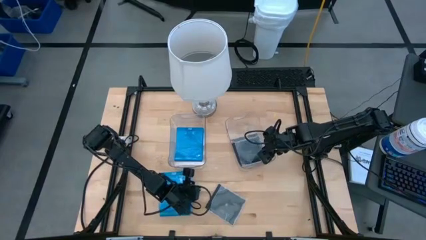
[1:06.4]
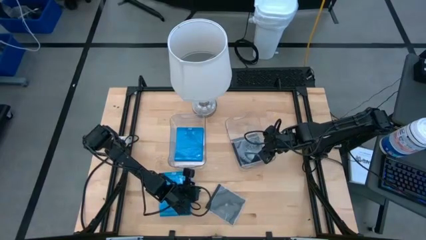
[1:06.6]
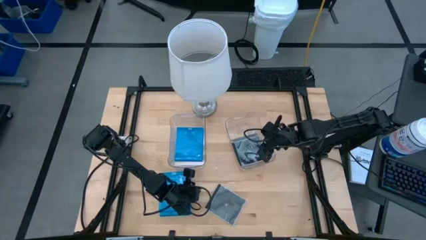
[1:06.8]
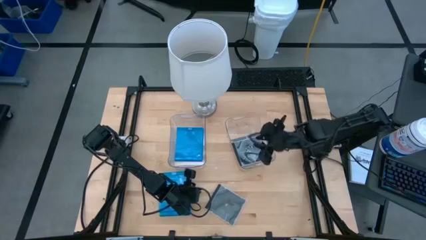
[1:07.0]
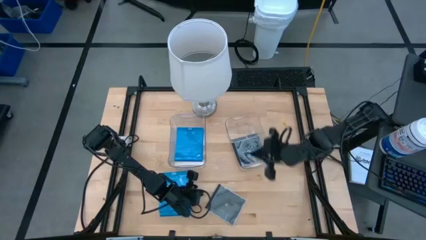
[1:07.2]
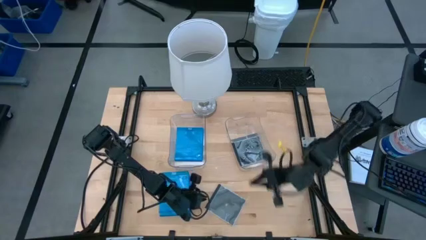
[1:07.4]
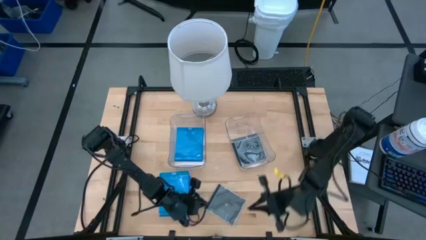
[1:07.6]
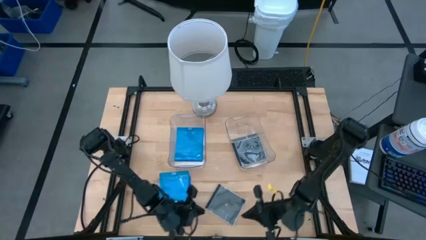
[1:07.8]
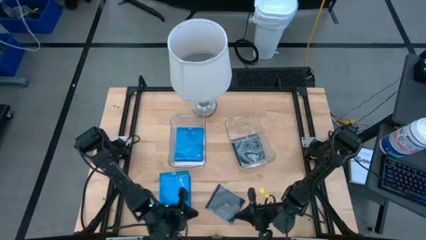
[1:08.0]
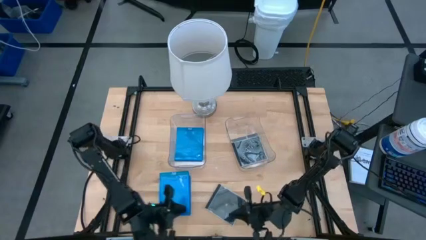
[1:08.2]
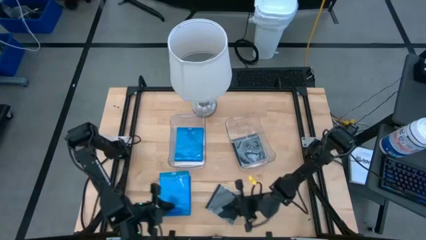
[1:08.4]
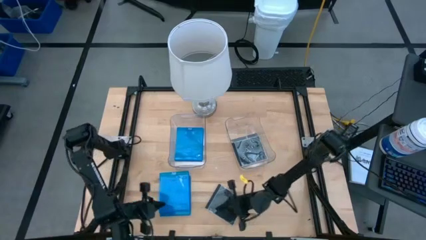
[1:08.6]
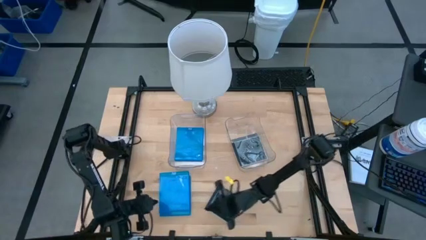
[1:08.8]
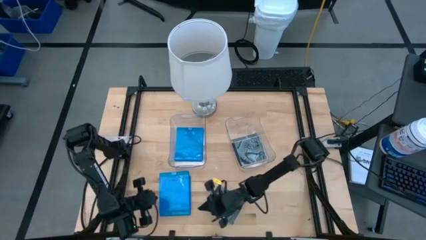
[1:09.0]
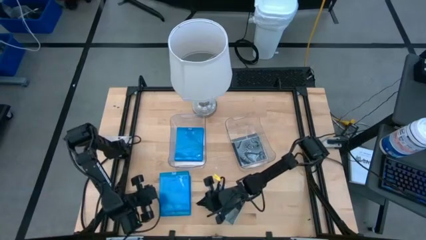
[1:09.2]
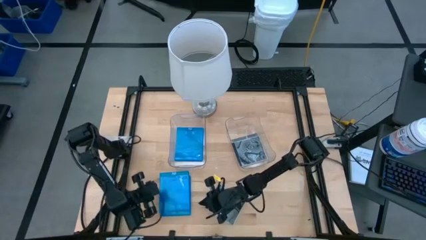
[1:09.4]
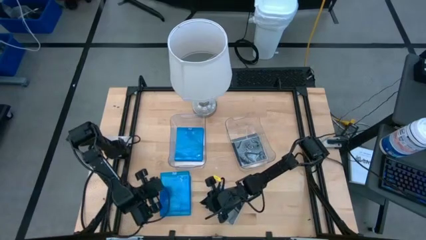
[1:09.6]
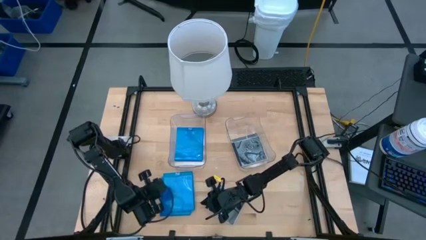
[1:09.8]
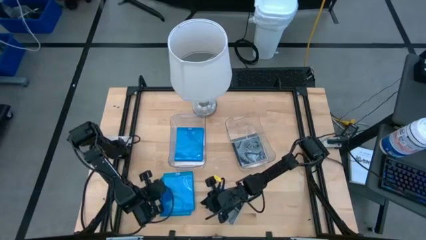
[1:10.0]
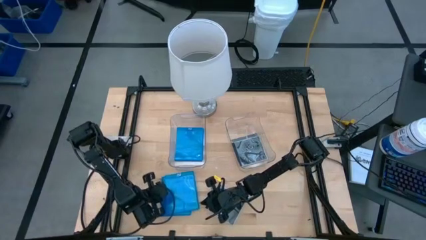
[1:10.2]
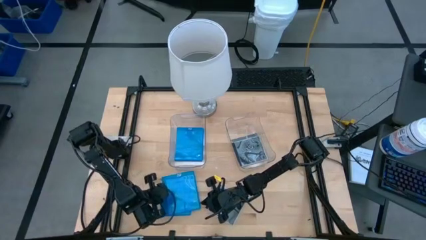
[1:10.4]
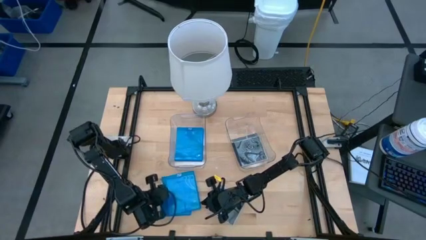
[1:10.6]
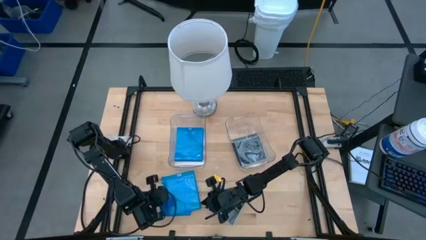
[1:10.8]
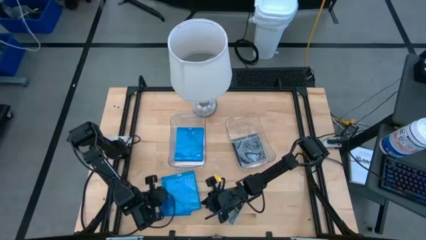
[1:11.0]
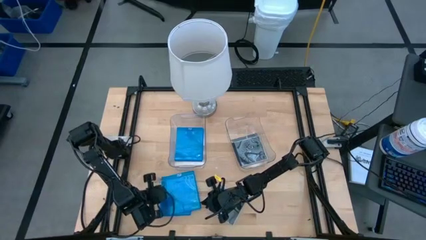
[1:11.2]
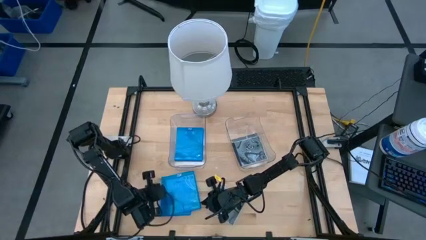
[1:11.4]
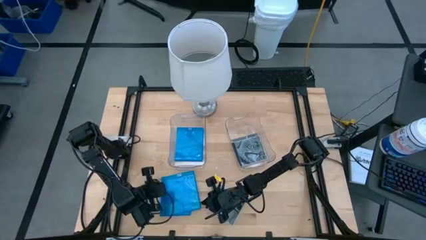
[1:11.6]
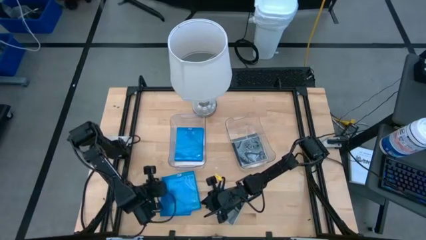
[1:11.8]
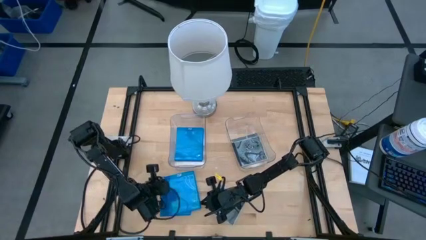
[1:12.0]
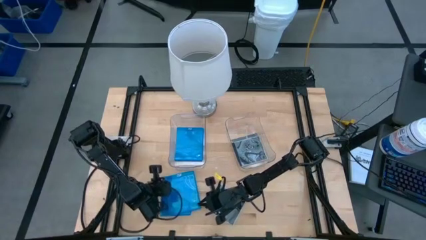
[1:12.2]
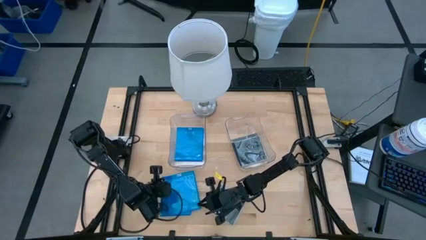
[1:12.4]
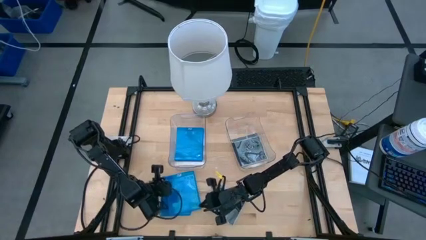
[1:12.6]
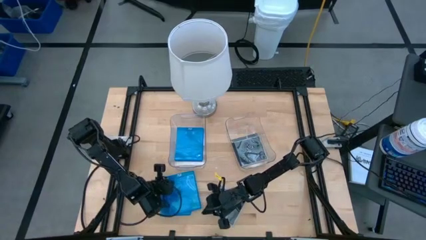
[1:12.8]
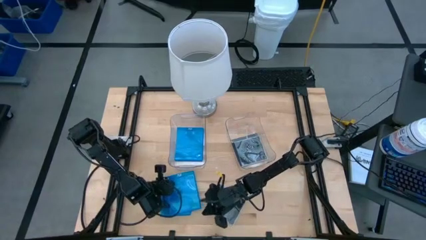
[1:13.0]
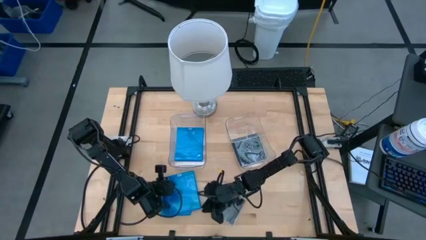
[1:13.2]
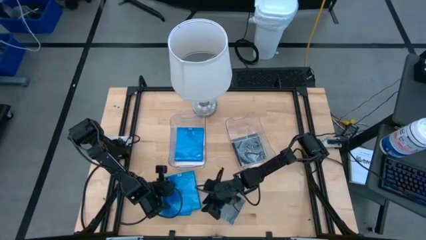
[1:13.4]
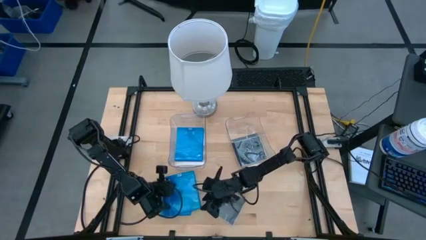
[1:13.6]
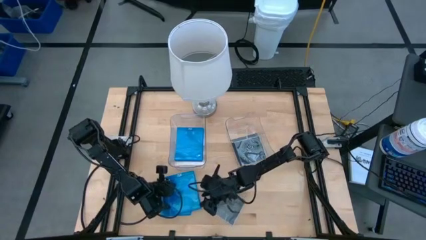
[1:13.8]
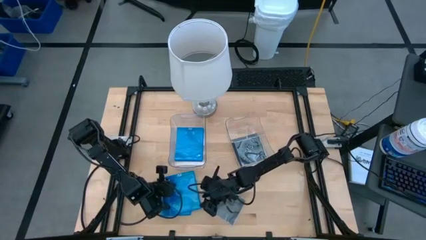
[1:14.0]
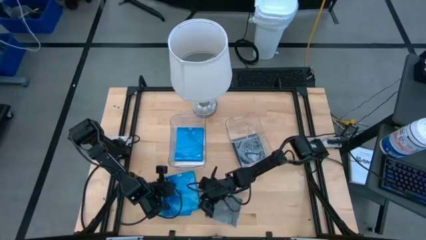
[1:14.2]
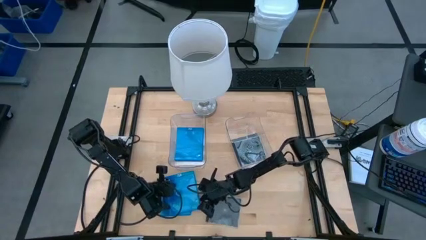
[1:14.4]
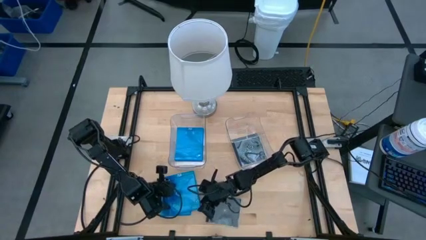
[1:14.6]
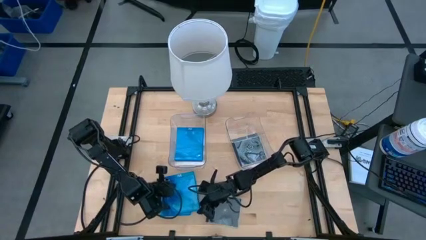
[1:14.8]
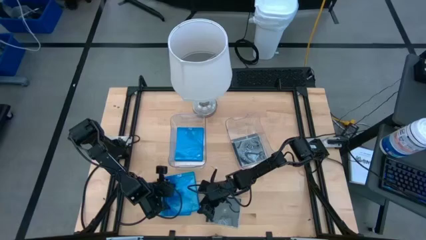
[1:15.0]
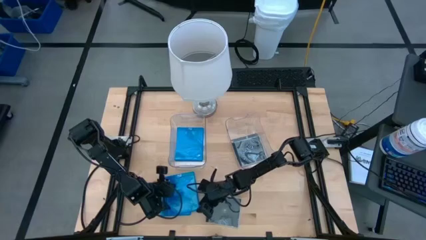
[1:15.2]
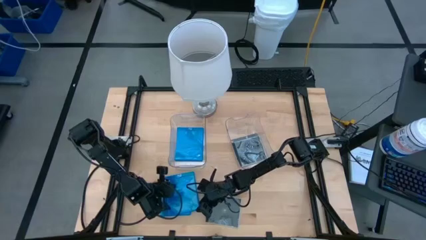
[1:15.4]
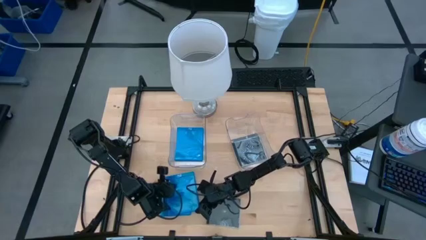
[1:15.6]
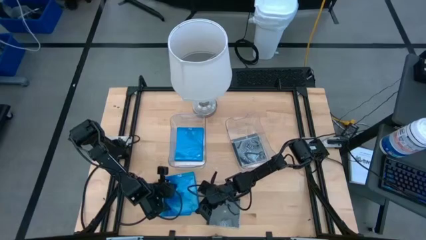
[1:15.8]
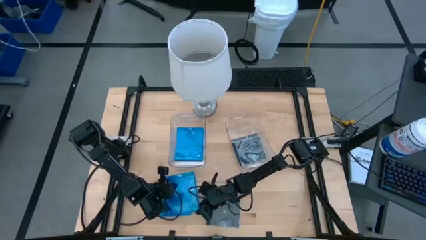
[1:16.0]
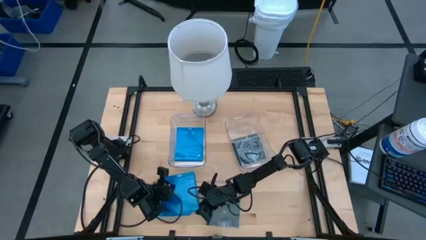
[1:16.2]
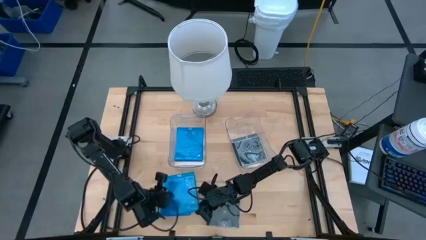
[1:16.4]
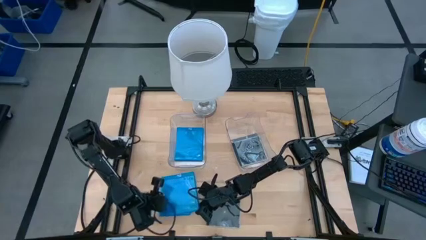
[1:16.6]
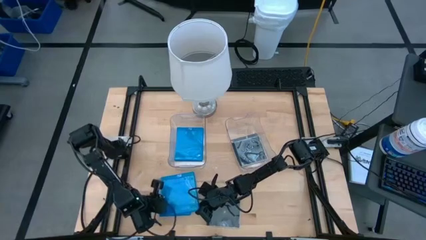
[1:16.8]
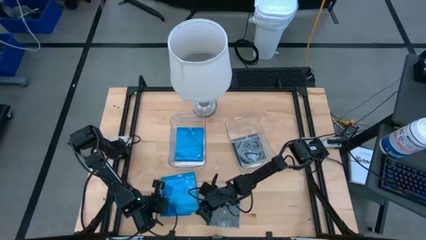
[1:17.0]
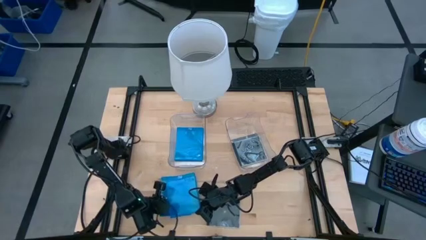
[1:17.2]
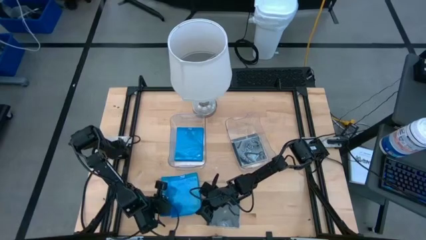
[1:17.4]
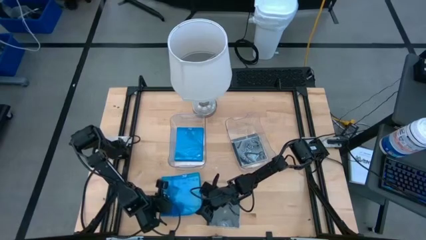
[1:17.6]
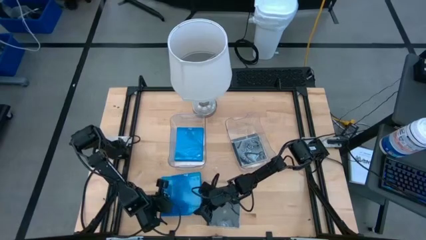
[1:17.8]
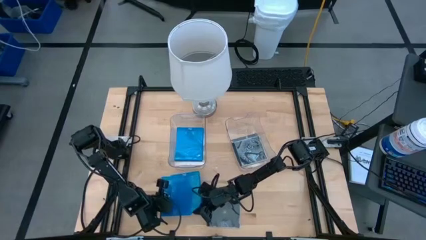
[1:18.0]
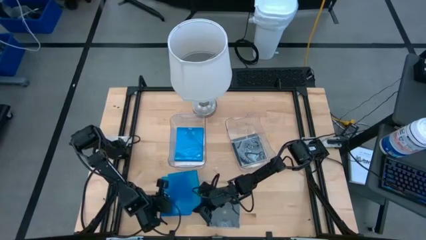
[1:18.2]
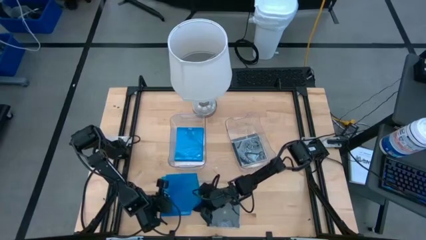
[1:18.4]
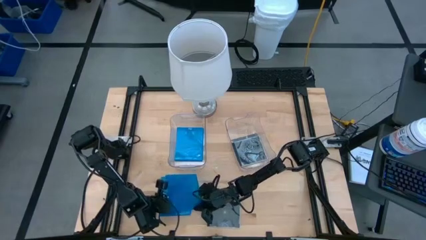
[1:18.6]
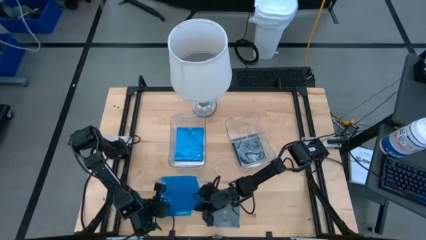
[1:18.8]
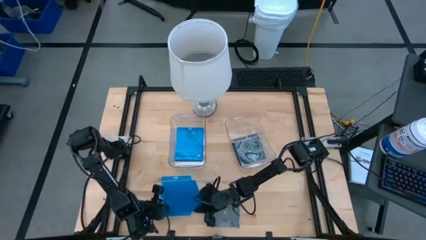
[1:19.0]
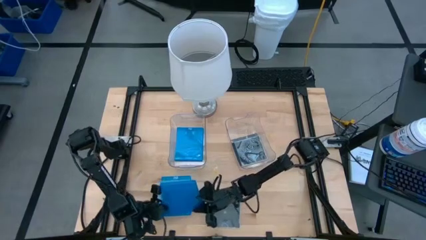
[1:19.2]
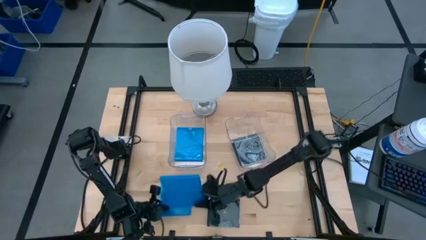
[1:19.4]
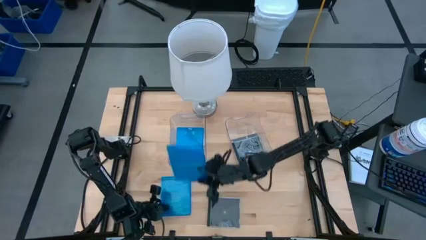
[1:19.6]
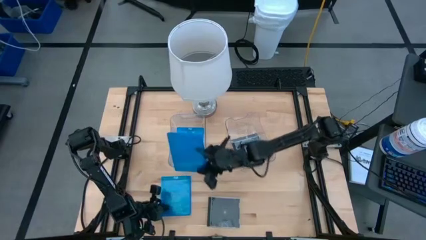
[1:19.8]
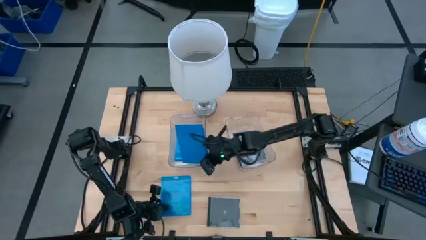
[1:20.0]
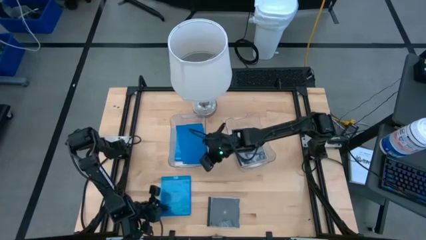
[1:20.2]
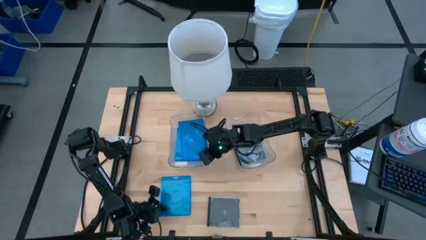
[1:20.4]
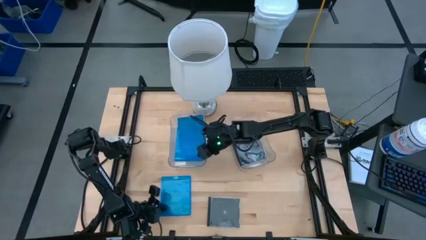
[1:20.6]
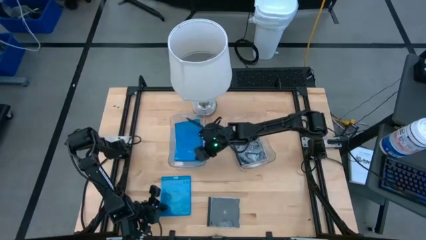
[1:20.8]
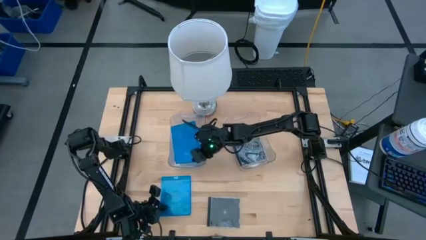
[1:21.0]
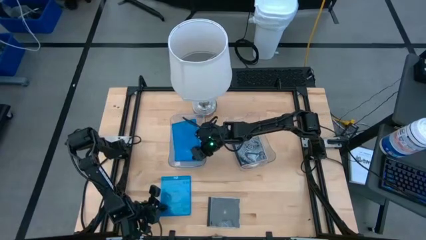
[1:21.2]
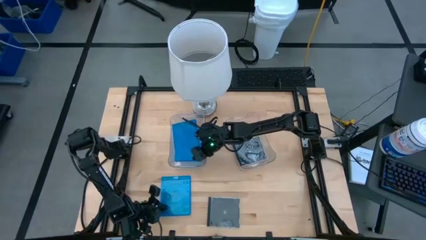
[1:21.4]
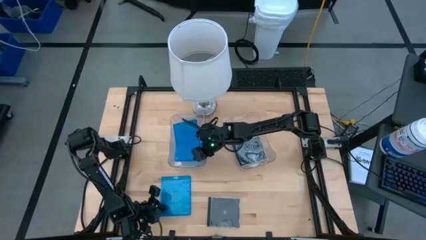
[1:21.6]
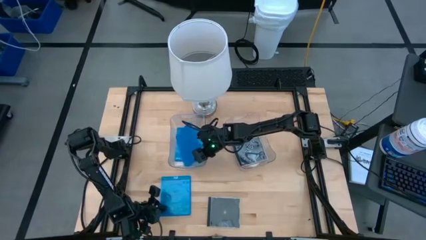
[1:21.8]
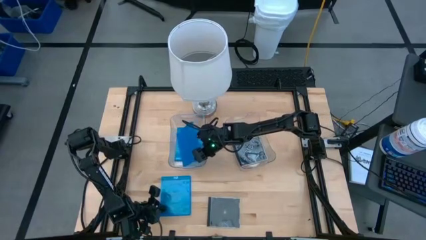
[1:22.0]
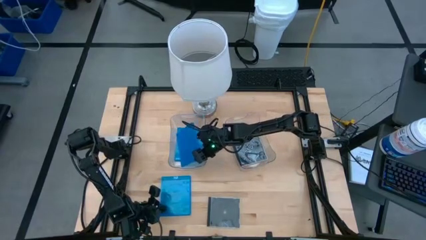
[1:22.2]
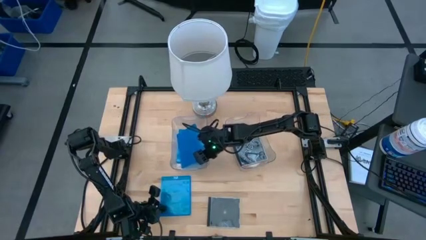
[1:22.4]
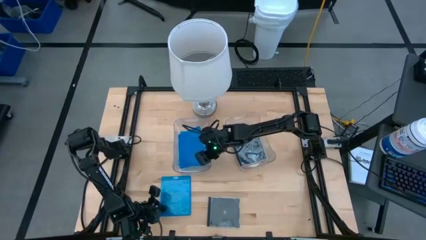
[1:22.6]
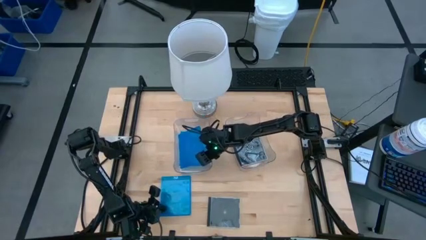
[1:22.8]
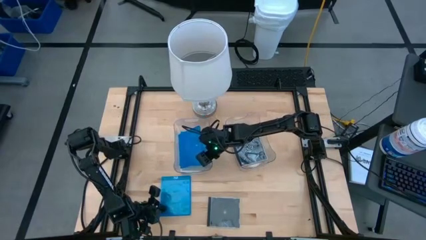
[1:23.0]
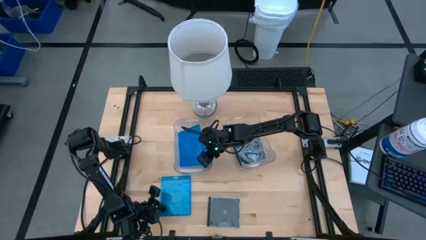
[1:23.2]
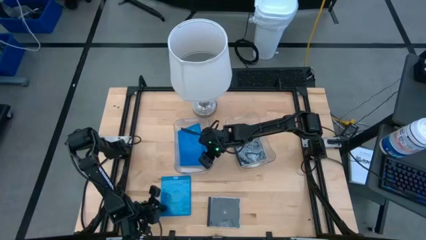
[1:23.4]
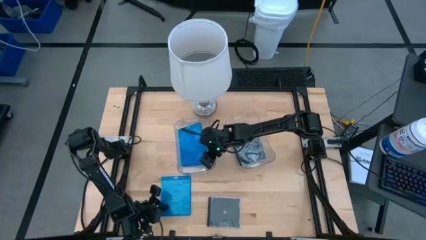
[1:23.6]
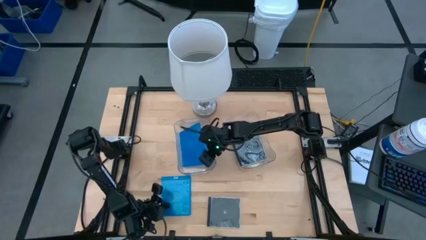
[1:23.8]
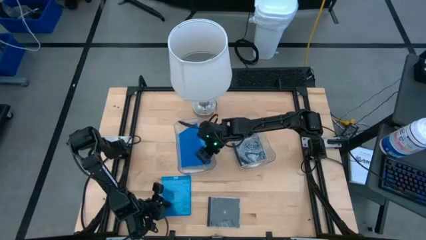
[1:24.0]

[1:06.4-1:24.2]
Task: Pick & place jewel cases by type
Put the blue CD case into the left transparent bin
